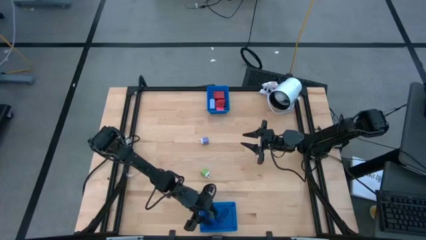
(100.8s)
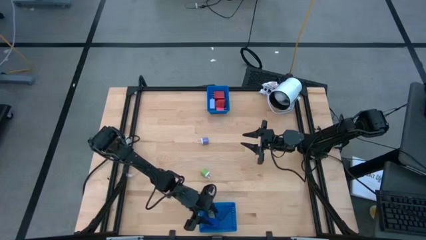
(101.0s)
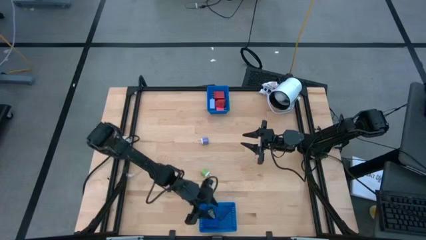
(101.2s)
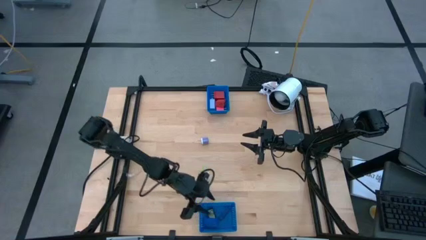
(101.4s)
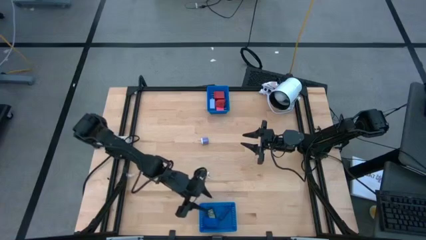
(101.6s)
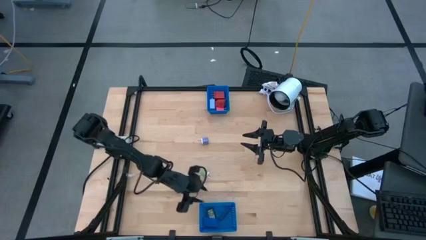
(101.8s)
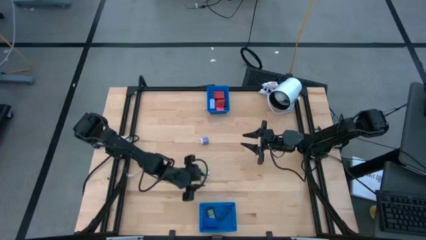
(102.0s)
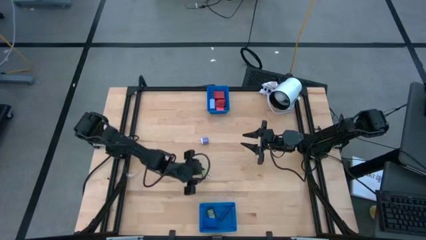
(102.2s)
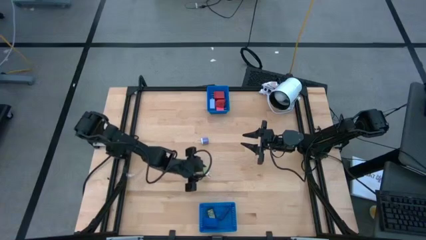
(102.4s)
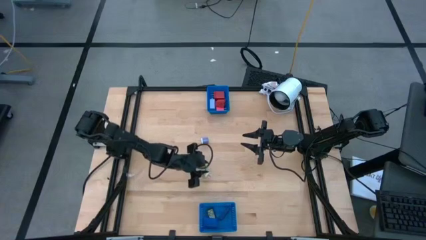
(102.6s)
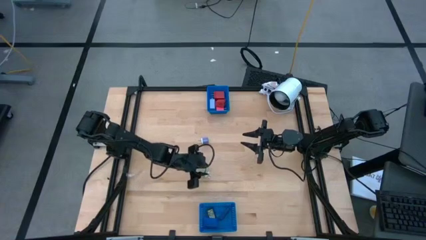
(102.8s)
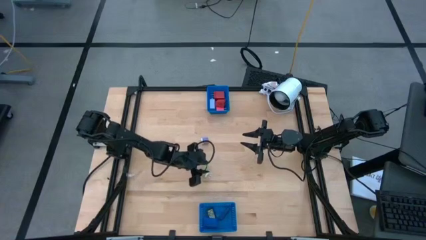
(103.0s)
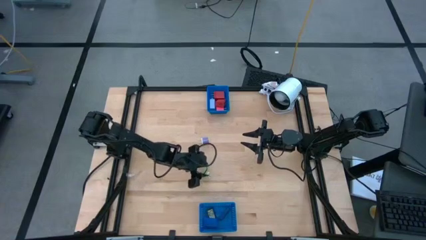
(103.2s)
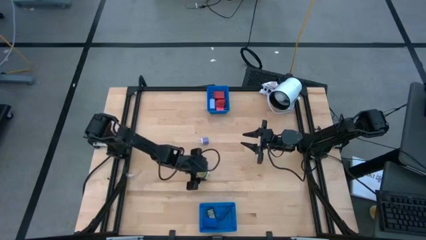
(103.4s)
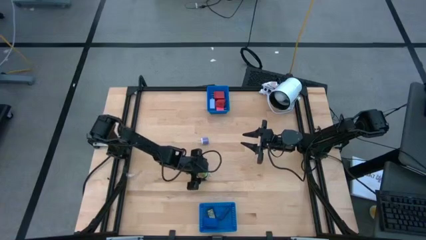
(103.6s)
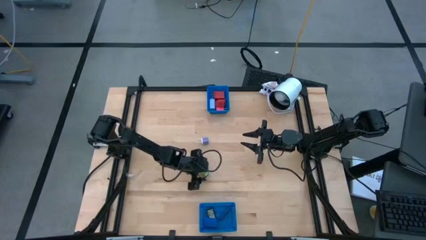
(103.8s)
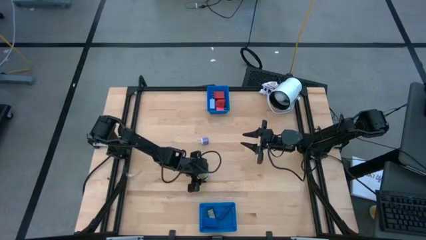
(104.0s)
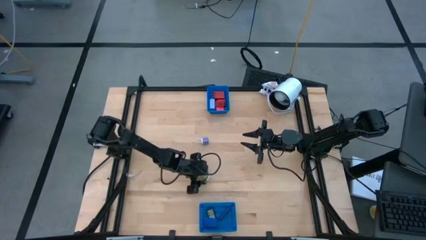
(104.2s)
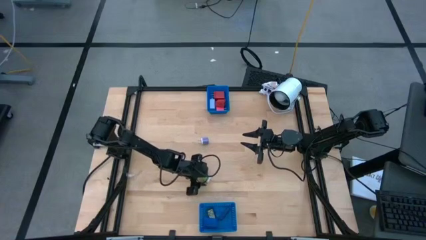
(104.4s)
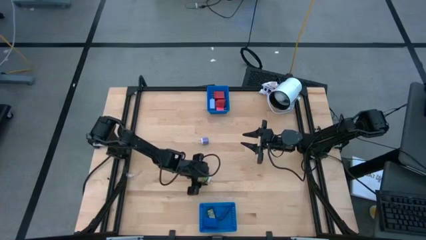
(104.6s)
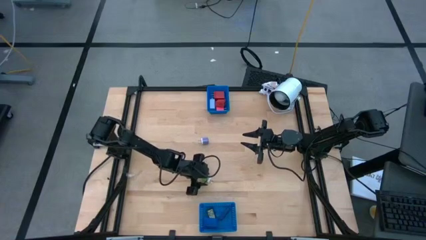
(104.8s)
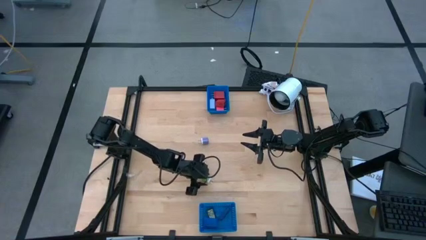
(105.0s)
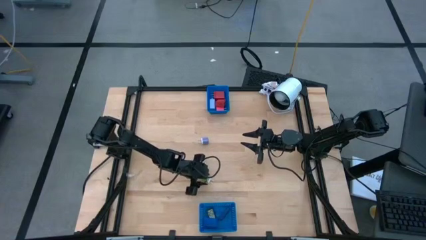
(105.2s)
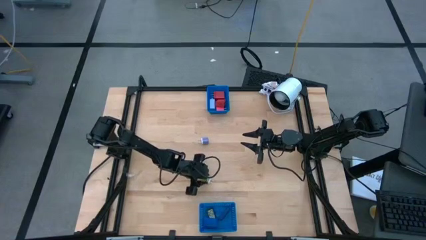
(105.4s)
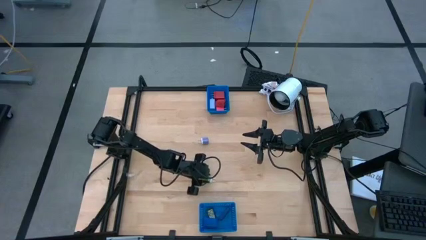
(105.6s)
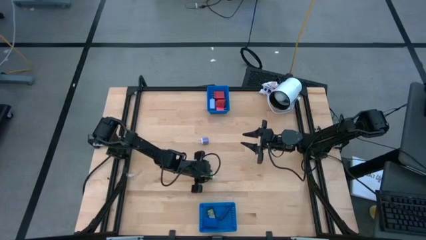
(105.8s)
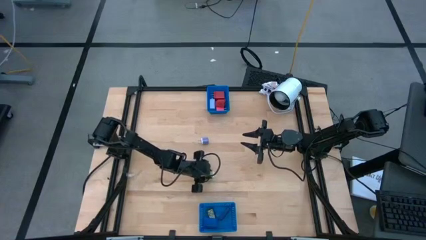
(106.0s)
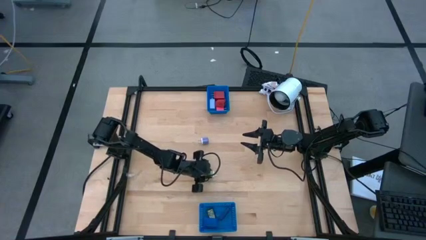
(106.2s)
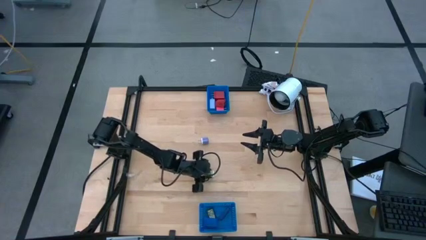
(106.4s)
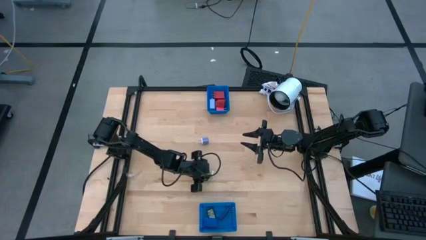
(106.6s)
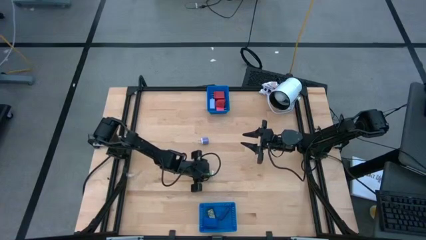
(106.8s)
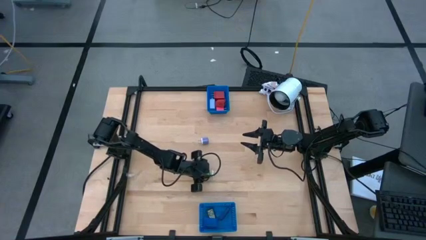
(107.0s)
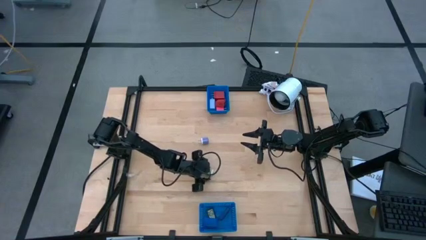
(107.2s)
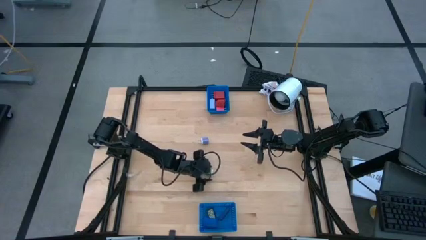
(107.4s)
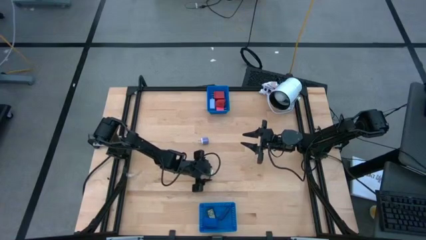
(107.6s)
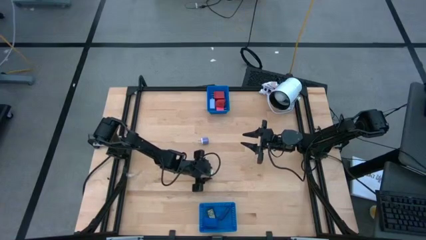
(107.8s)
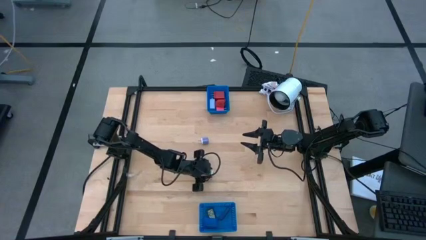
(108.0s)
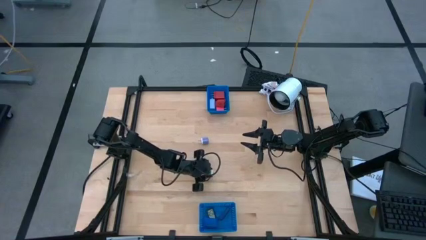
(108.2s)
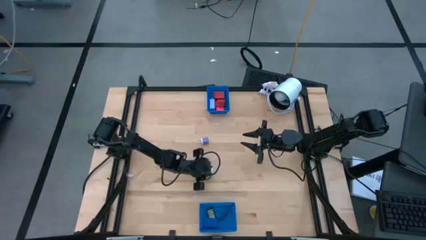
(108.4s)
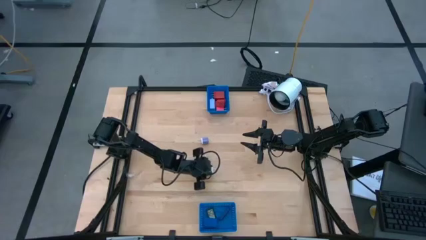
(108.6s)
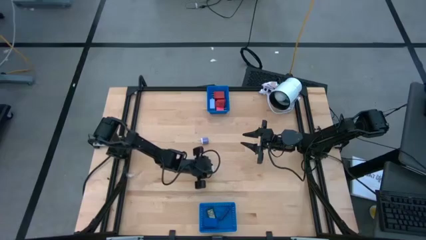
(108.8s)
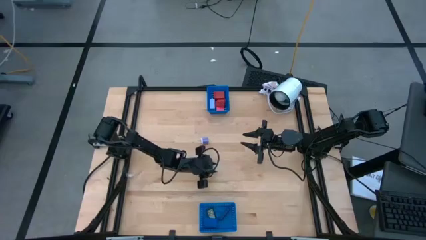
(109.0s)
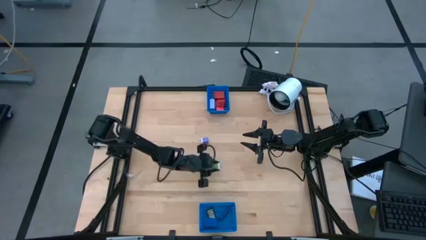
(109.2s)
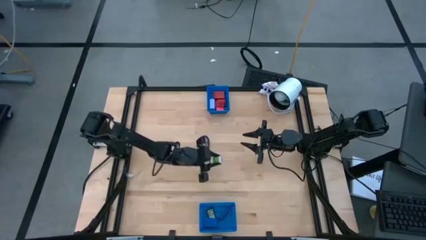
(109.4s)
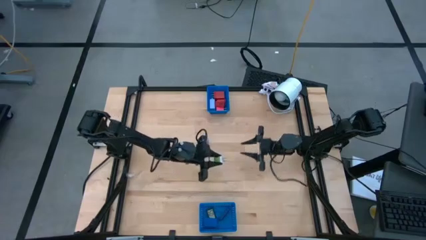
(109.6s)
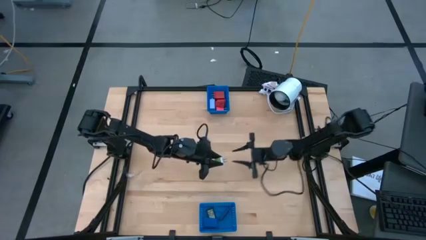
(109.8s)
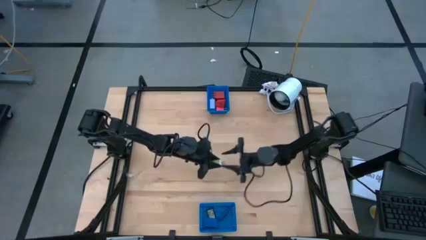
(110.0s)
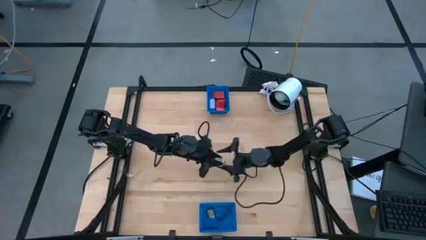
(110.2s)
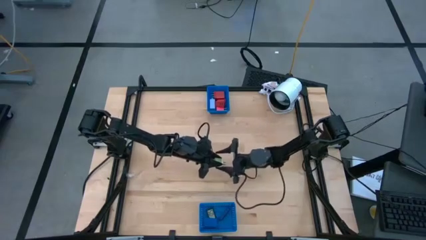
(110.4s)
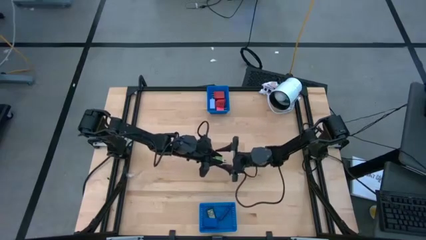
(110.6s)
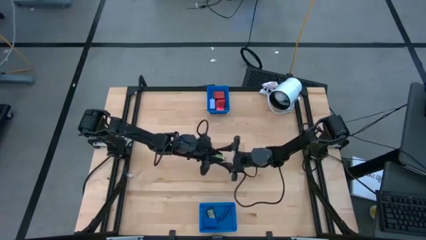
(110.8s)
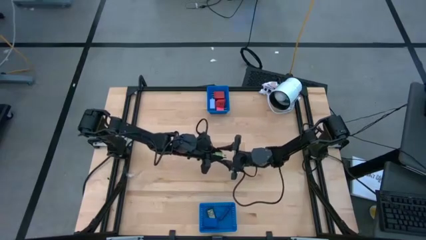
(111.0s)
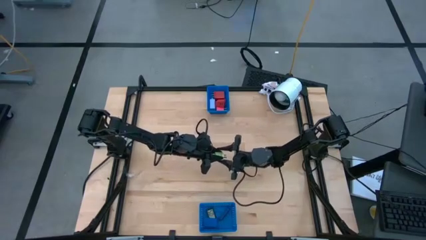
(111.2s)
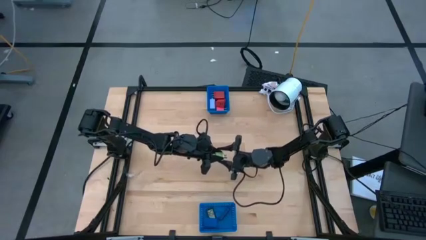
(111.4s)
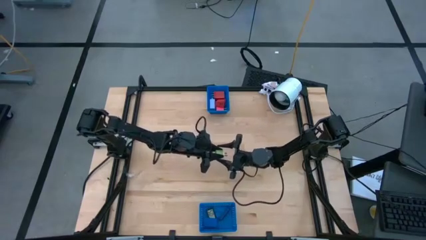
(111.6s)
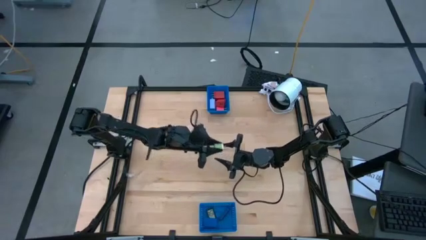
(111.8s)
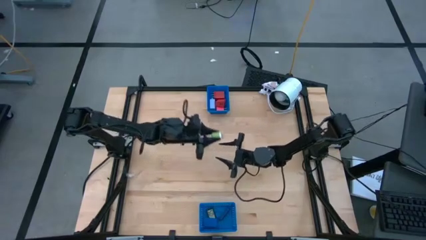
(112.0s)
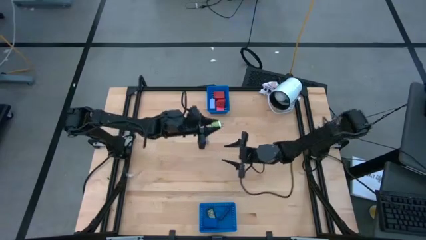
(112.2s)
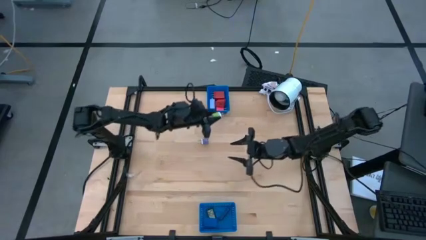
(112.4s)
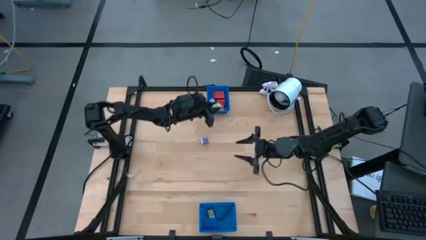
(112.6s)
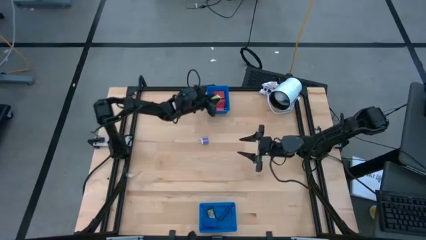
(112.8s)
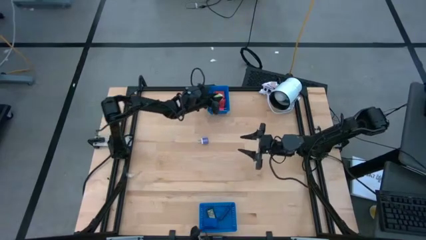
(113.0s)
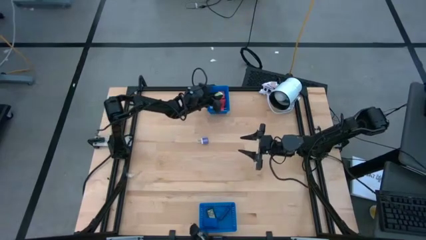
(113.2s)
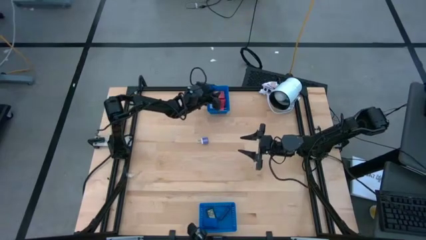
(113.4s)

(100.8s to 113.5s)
Task: Pick & Place Office items
Put the green charger adapter into the top blue bin

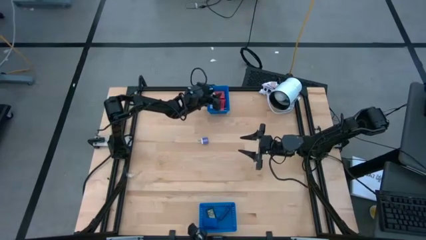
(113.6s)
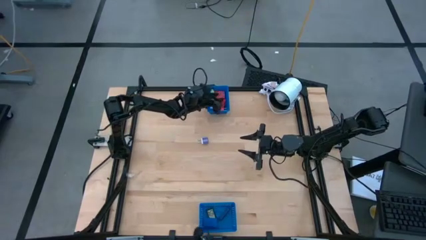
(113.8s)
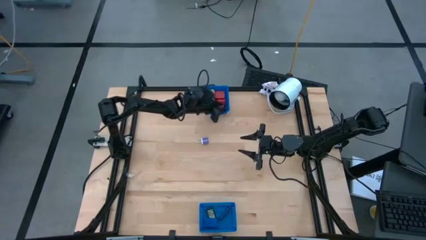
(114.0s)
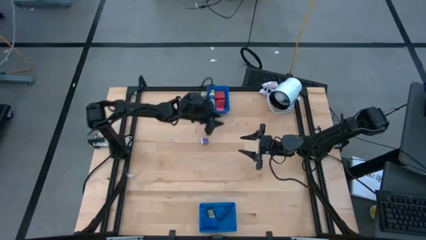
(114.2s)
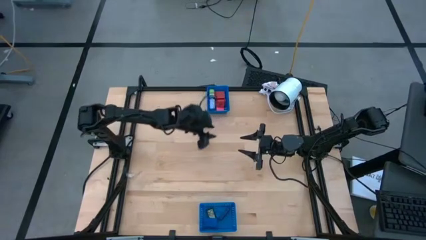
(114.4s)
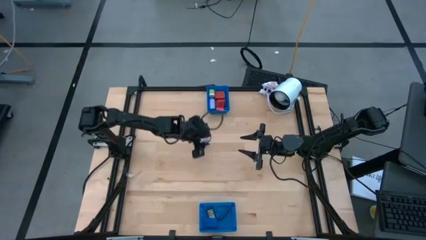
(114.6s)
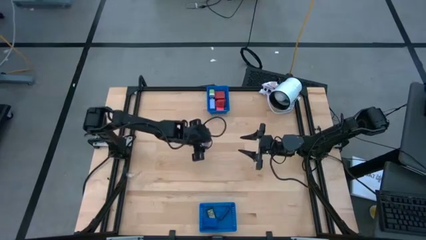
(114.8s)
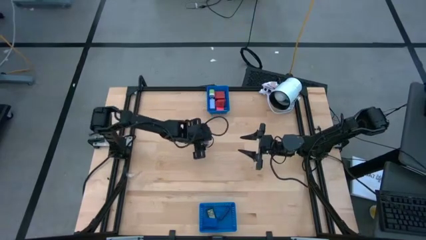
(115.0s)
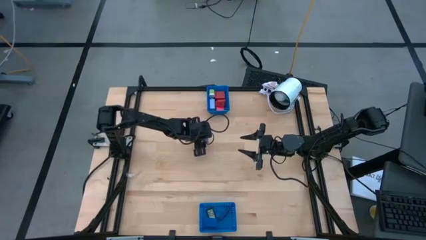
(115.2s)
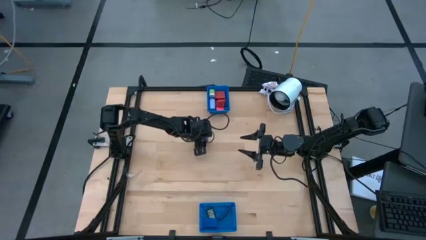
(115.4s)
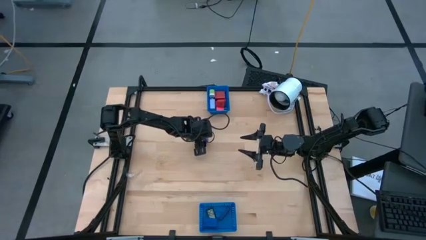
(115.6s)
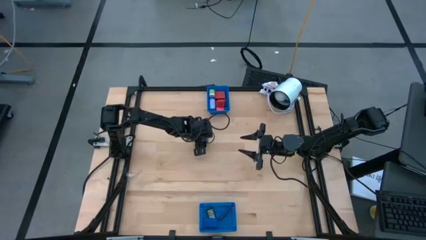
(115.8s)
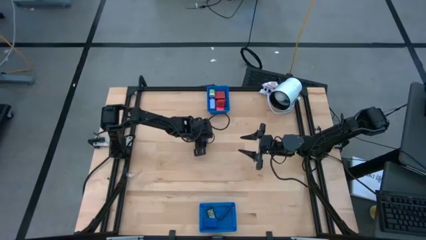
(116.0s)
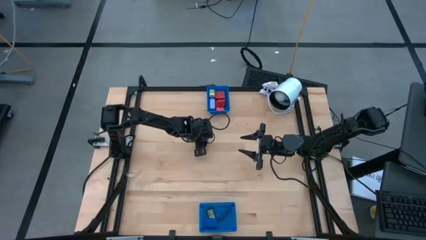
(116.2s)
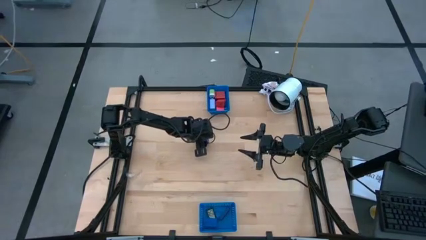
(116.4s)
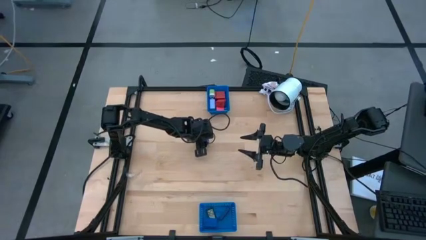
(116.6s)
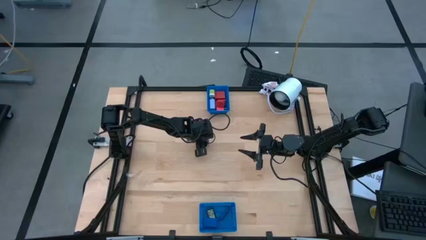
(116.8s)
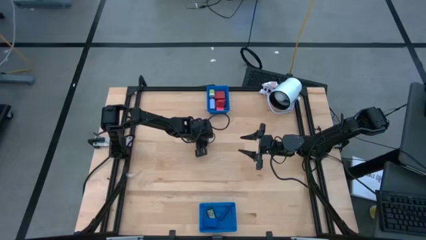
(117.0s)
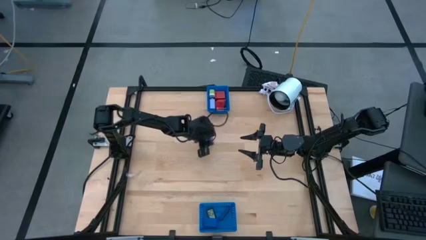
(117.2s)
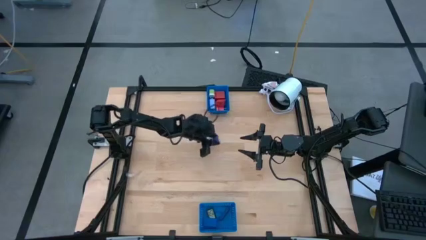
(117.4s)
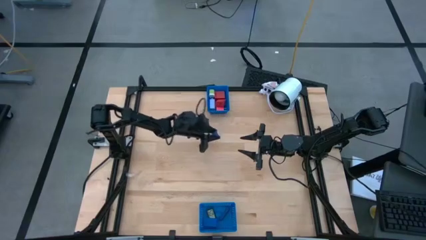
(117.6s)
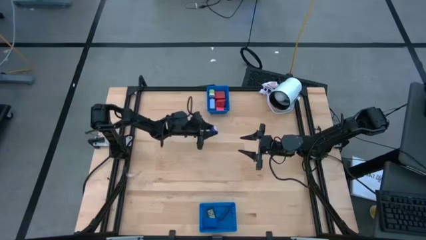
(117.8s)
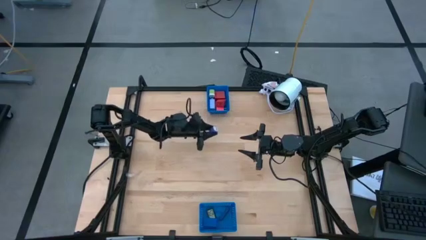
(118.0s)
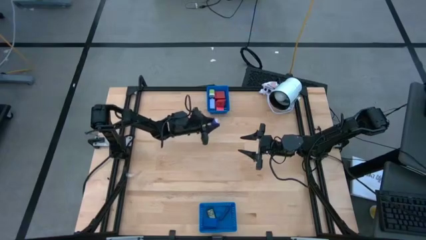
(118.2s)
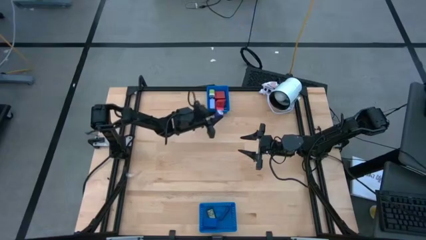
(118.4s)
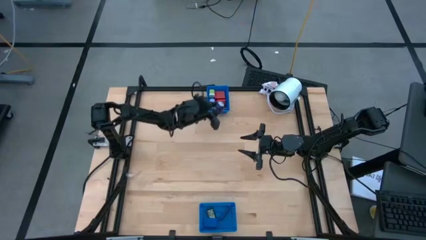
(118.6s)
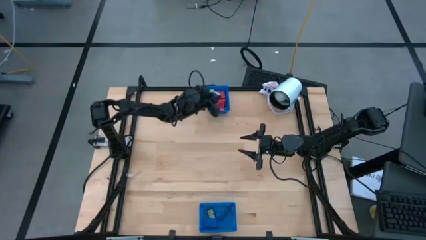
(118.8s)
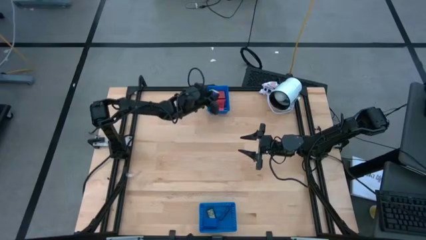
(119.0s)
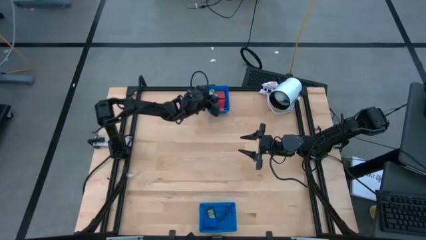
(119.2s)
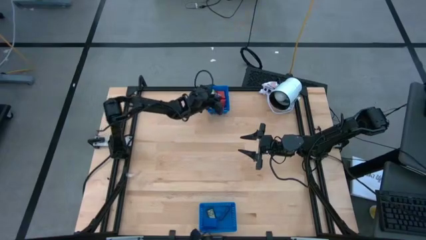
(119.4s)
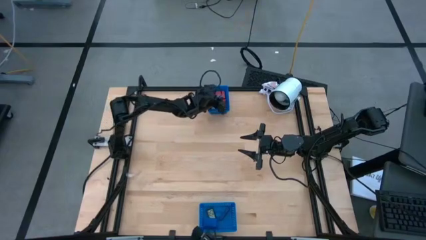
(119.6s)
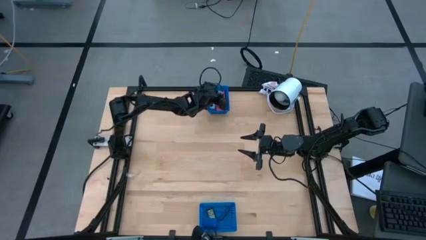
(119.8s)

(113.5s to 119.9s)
Put the purple charger adapter into the top blue bin
